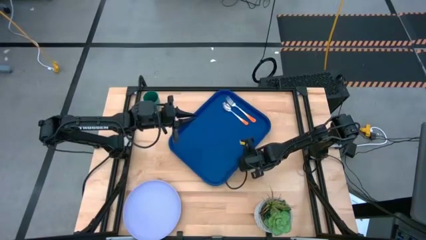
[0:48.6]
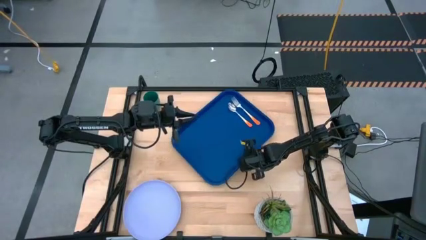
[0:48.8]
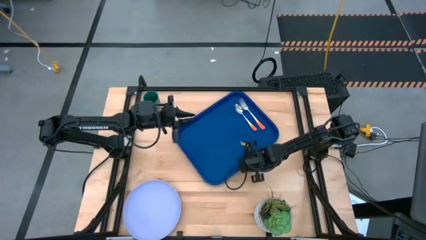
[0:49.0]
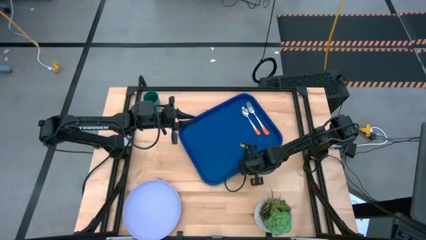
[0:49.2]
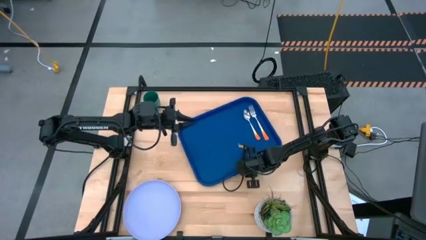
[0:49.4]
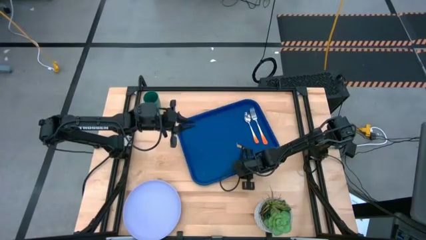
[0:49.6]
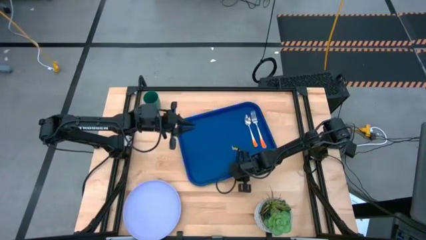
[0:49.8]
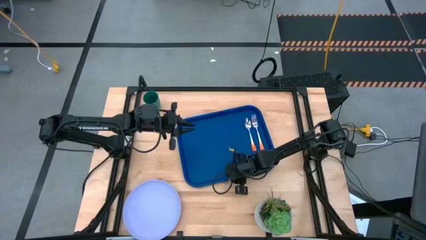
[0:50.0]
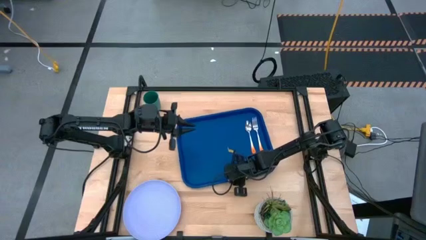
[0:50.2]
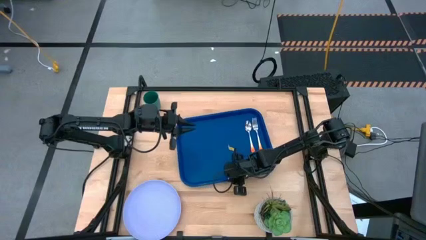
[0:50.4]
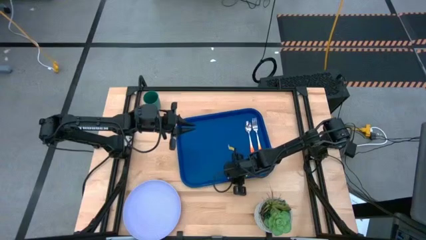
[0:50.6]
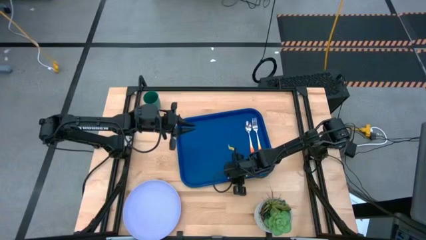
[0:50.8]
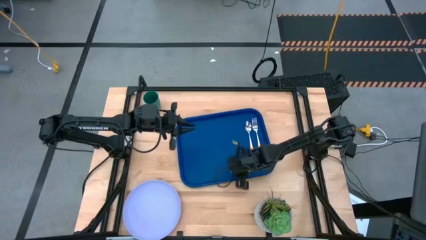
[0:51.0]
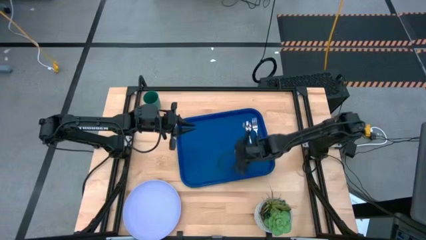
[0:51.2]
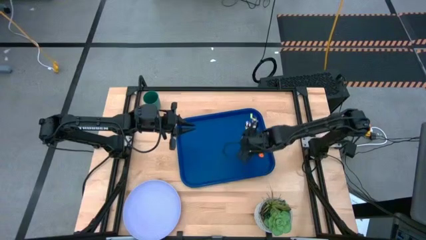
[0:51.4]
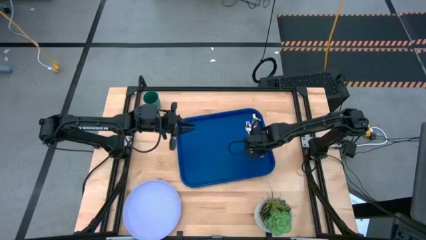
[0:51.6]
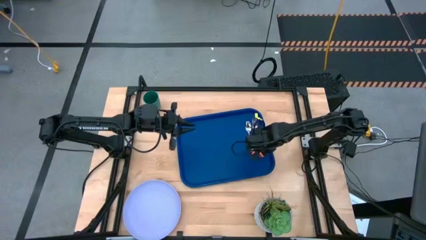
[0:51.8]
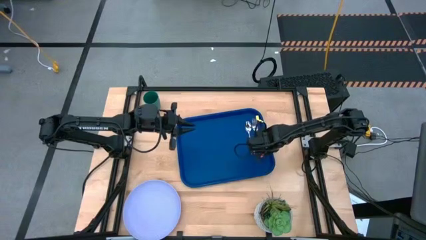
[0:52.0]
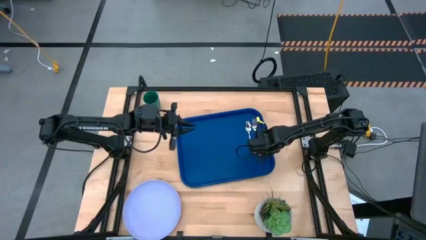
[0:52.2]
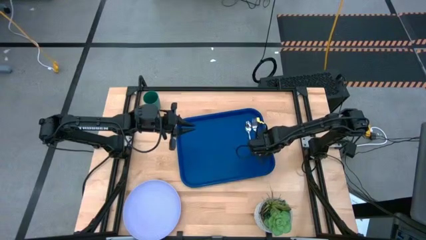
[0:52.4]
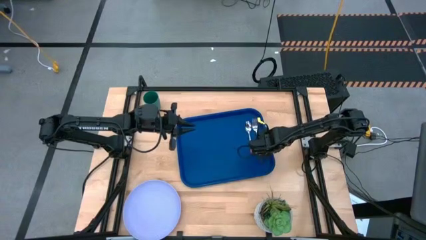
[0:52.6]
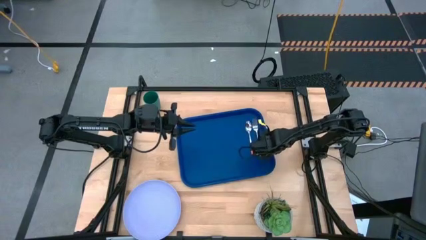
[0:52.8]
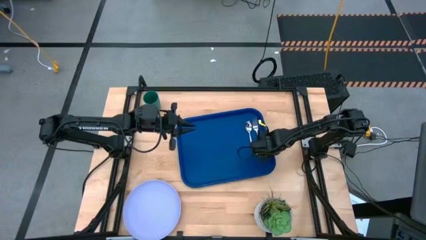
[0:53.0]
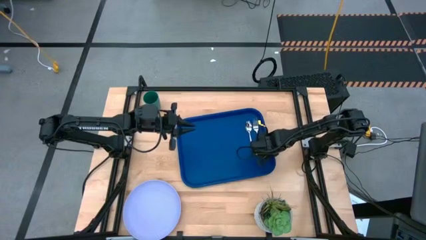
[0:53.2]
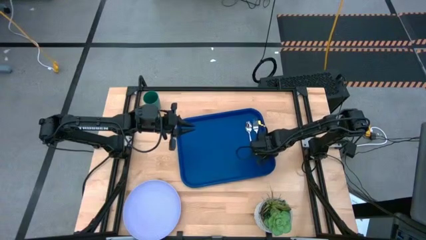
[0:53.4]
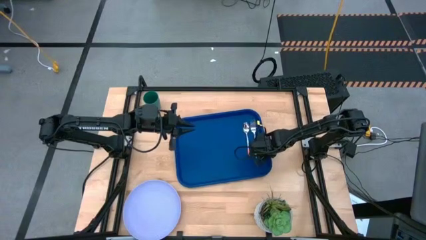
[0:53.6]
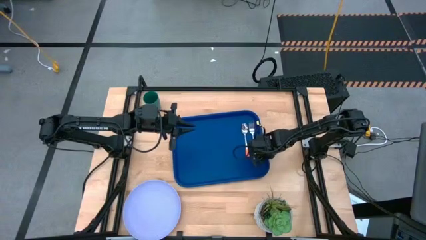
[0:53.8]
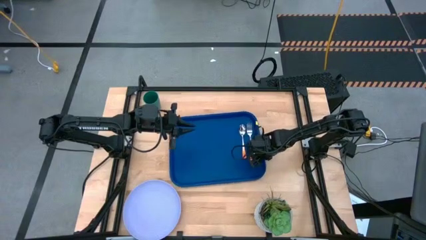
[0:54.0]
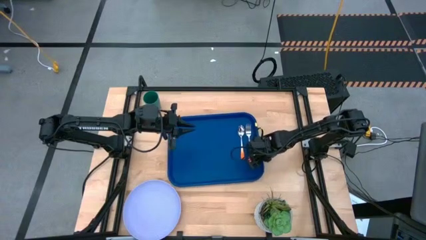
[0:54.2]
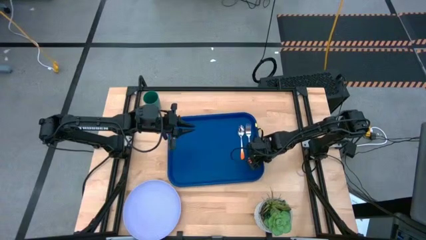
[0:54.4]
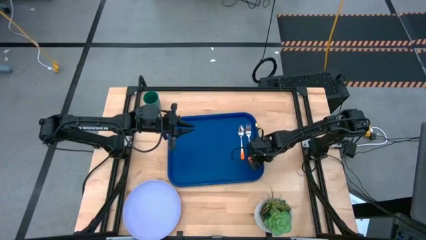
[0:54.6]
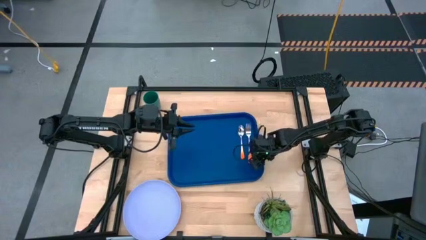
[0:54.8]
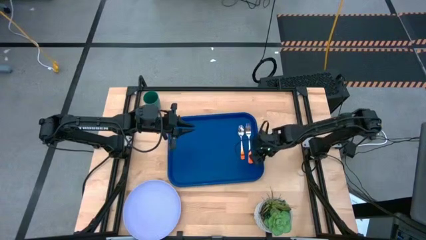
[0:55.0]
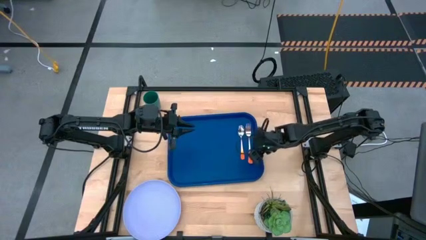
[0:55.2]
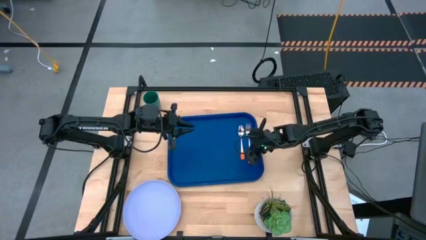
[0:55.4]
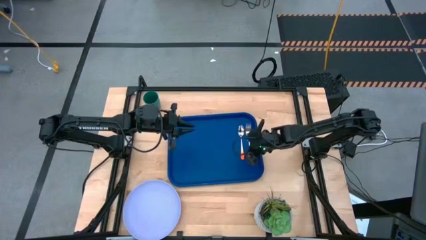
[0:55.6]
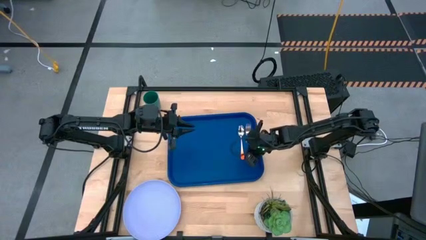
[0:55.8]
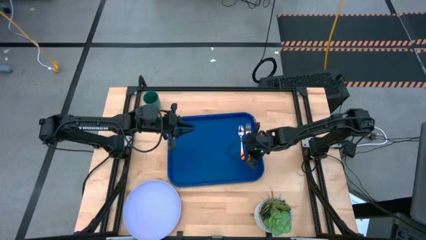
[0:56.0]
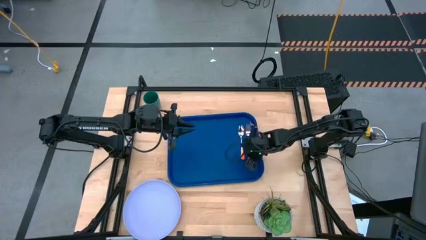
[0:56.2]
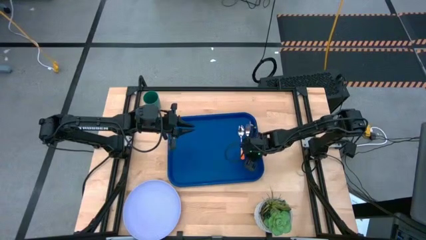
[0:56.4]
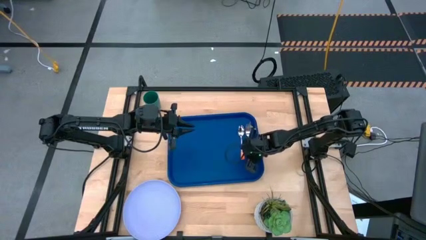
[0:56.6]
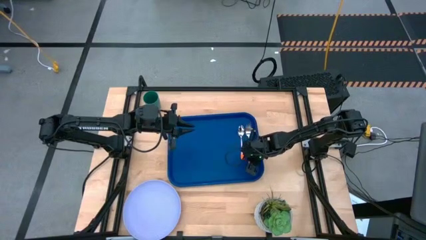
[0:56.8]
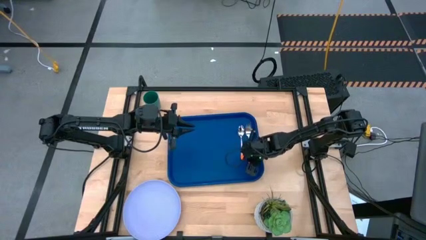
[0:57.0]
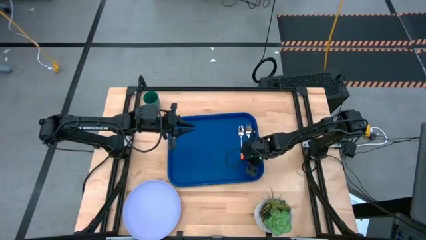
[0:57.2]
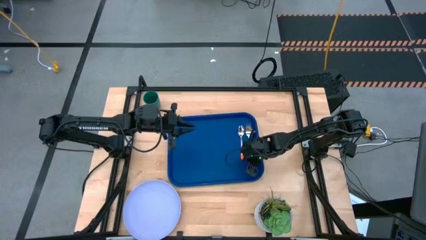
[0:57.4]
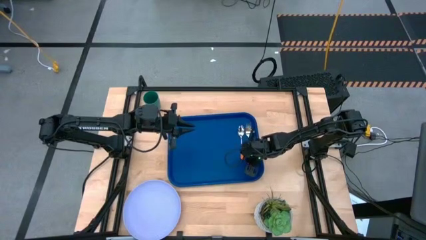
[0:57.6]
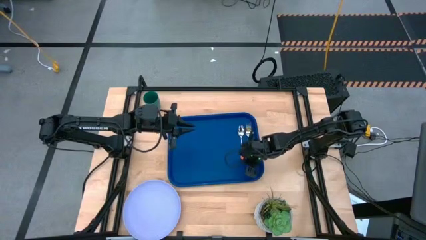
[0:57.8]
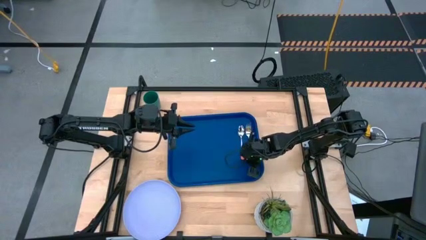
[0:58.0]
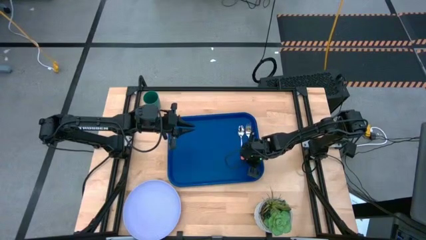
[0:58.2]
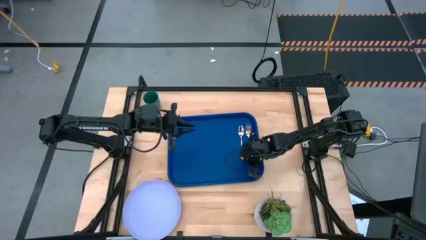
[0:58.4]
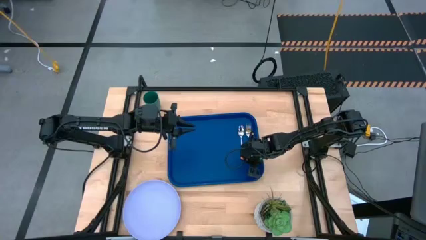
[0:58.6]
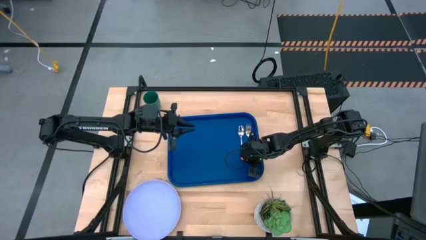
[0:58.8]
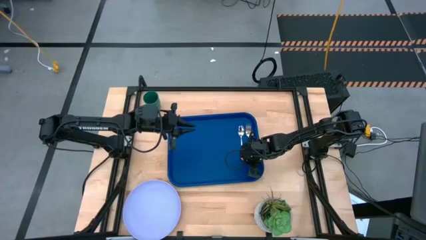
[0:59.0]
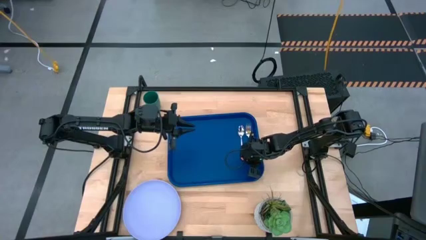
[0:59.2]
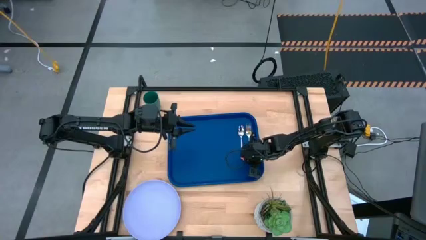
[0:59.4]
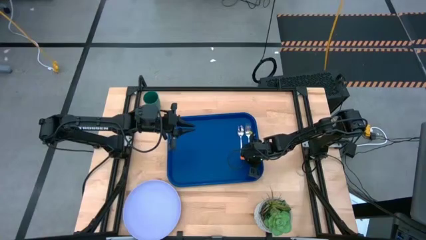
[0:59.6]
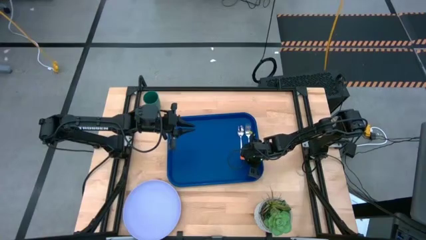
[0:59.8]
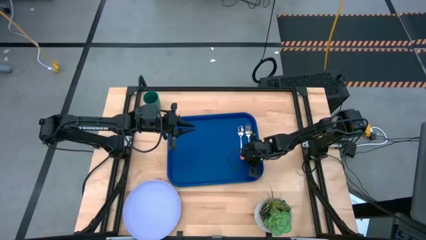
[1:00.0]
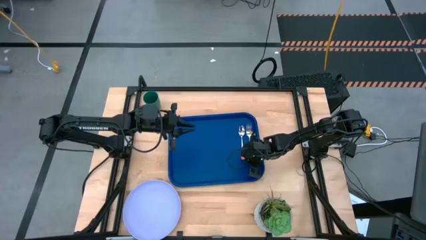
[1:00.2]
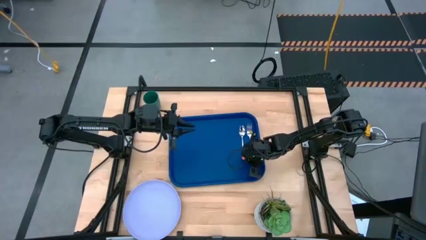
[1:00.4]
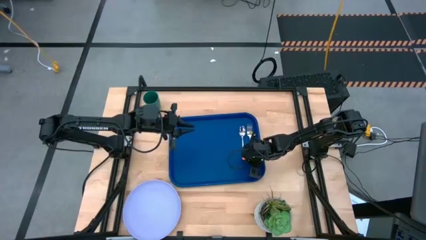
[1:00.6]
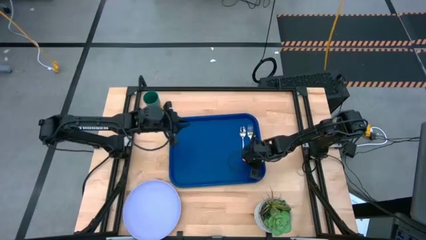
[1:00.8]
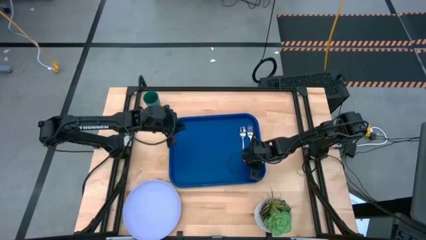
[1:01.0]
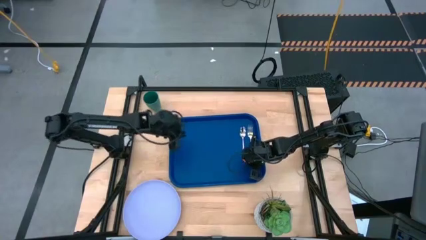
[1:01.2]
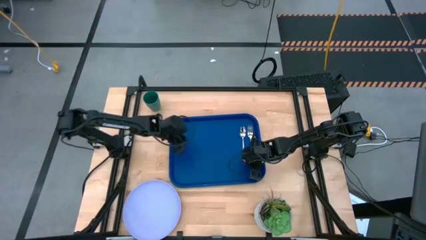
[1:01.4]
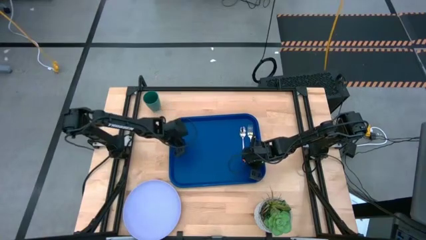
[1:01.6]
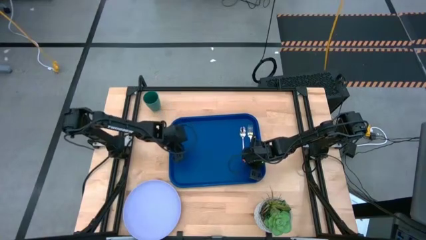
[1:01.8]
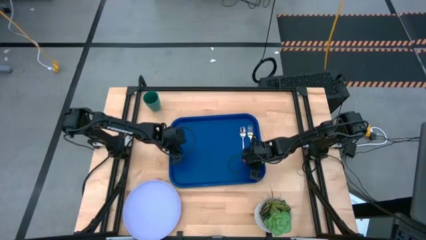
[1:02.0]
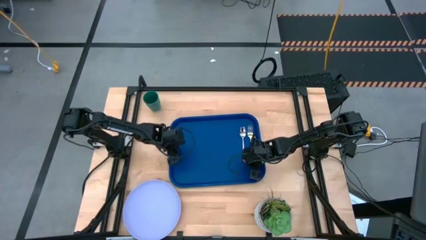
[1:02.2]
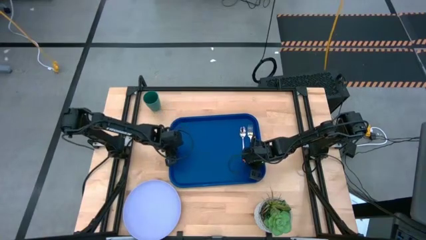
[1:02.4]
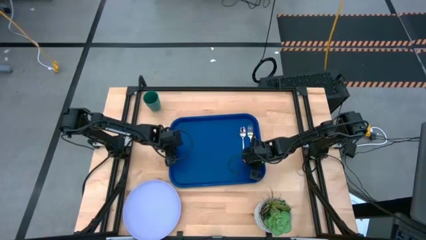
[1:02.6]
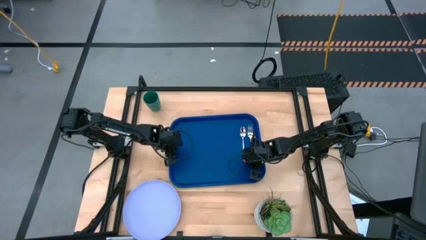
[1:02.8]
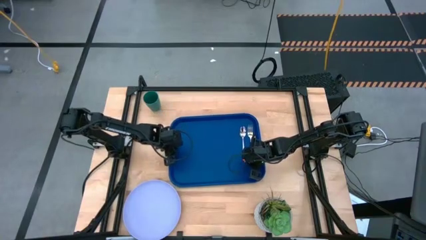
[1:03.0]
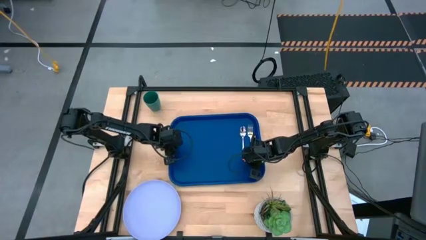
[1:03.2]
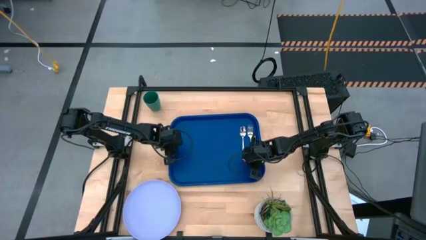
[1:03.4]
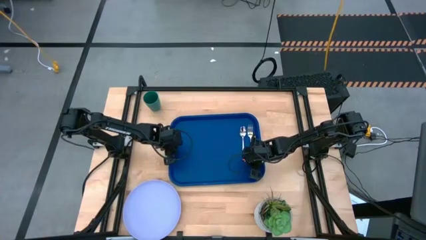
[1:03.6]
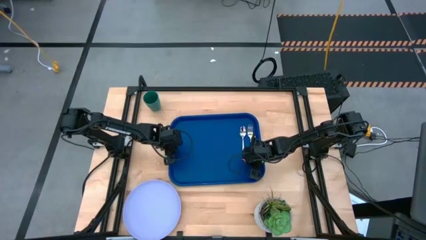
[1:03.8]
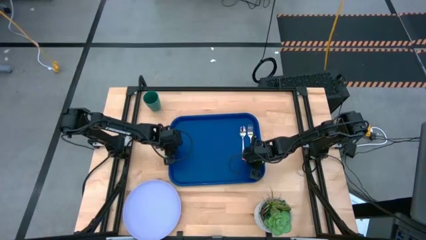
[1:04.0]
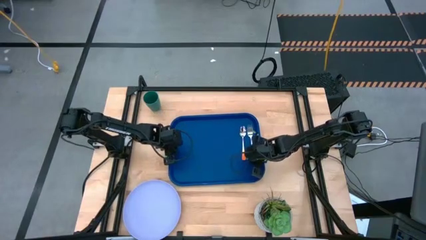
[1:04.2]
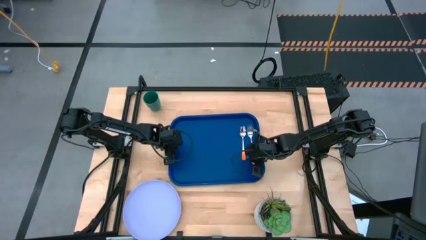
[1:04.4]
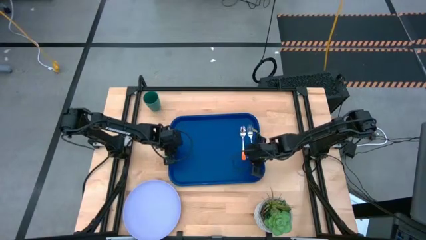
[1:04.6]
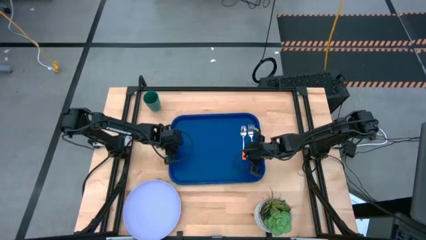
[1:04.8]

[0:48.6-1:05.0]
Task: Pick and place plate/cup/fork/spoon on tray
Adjust the blue serving tray
